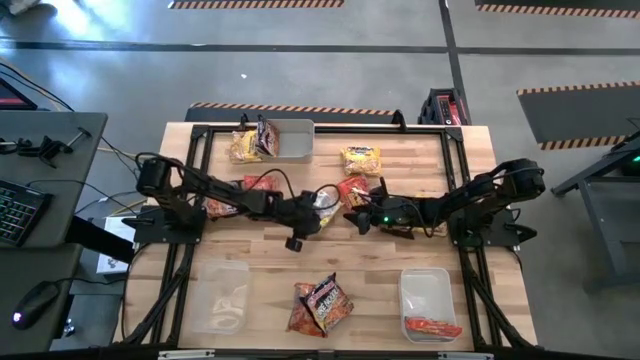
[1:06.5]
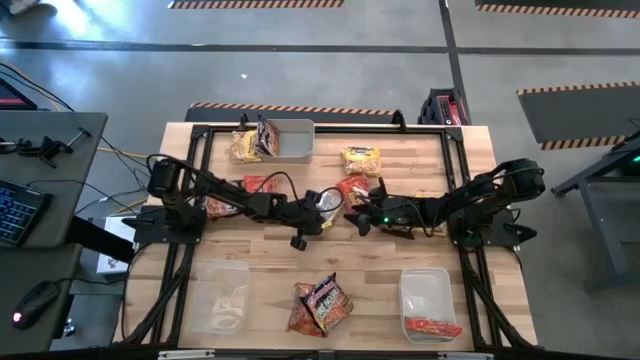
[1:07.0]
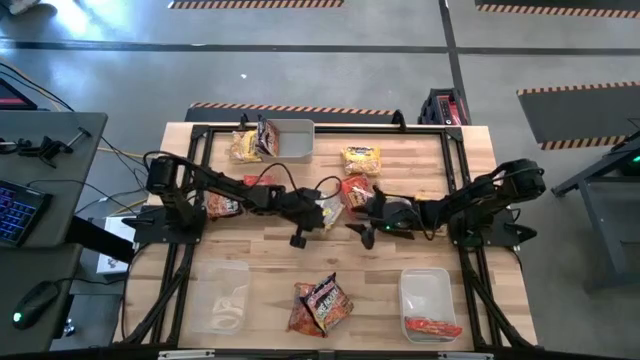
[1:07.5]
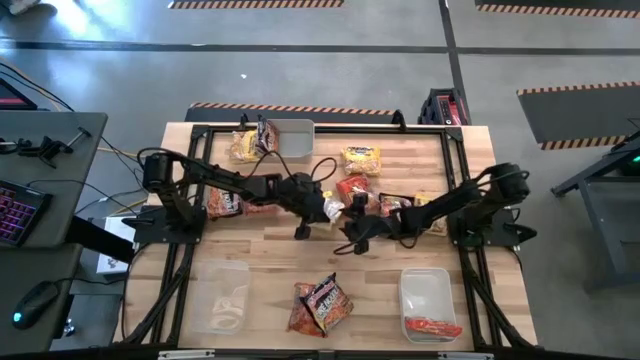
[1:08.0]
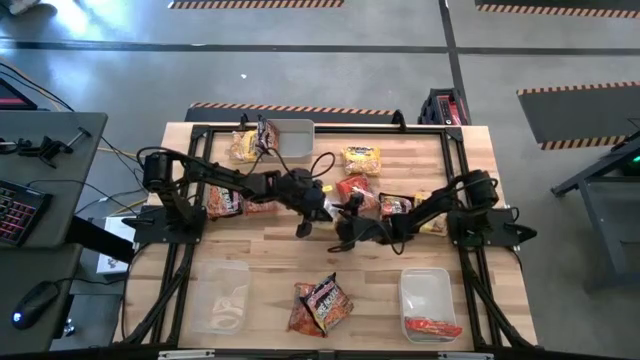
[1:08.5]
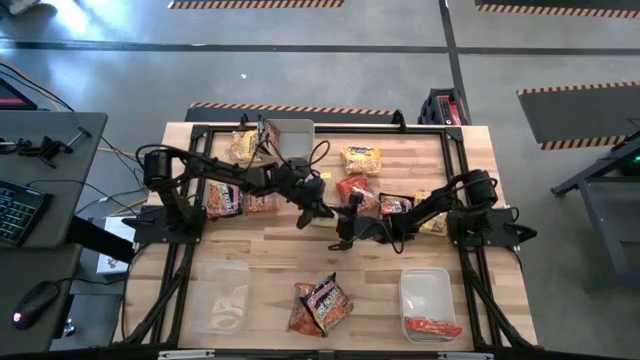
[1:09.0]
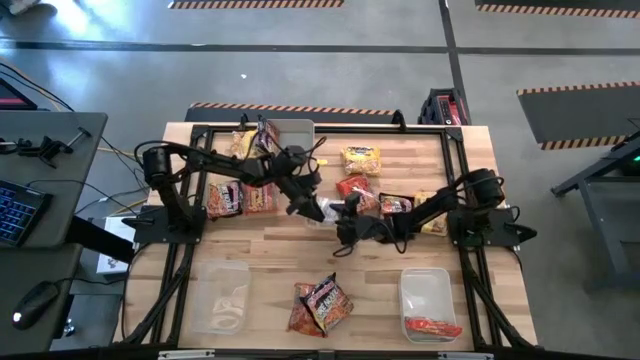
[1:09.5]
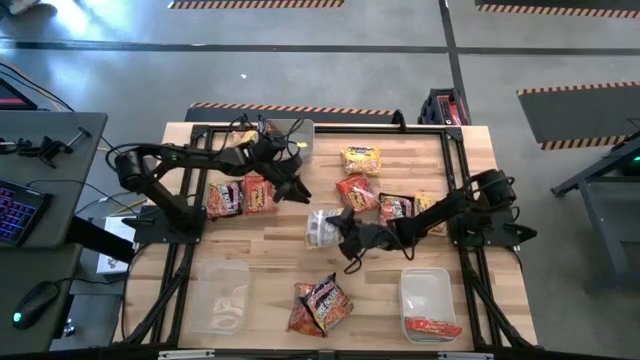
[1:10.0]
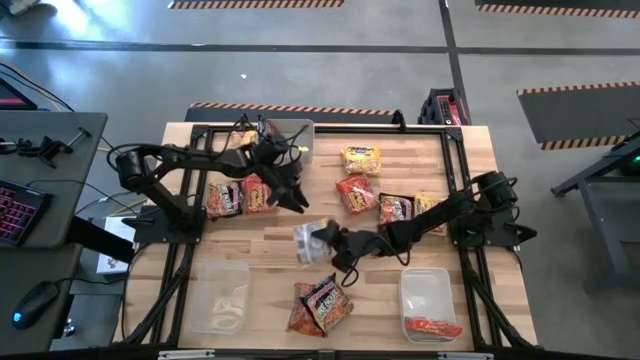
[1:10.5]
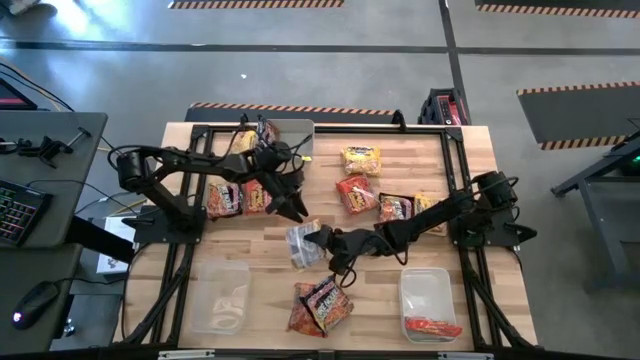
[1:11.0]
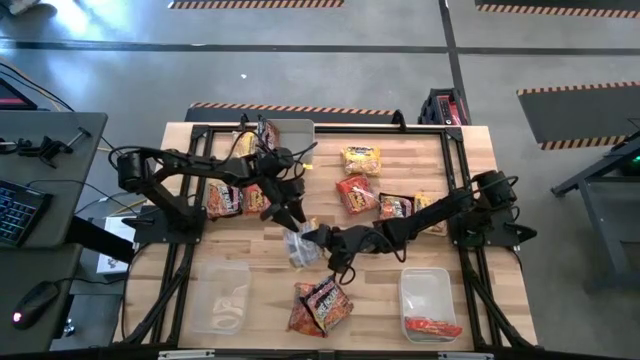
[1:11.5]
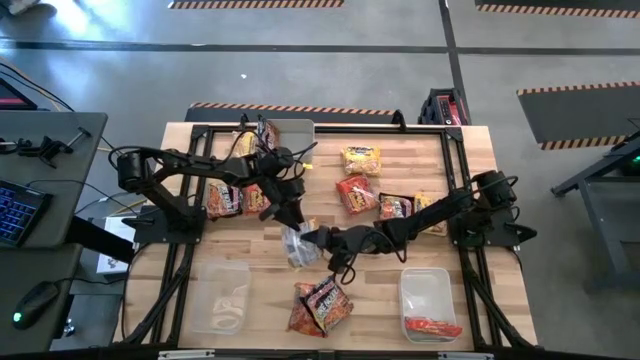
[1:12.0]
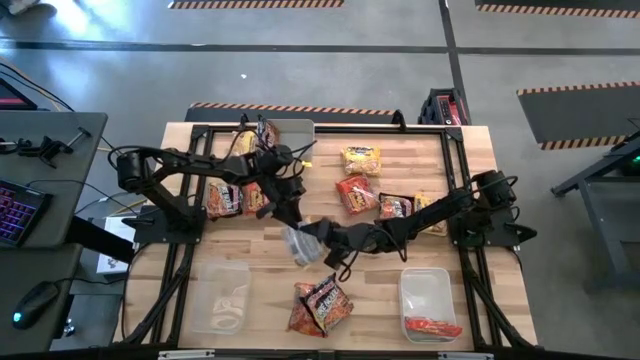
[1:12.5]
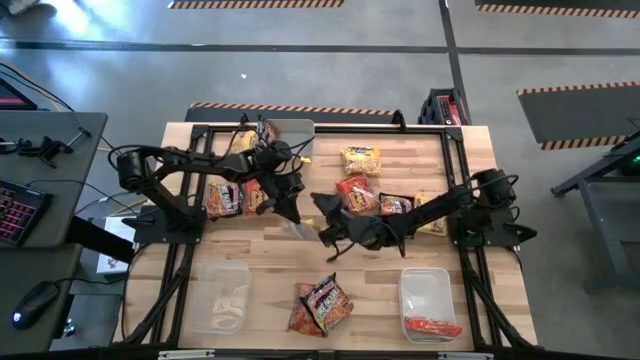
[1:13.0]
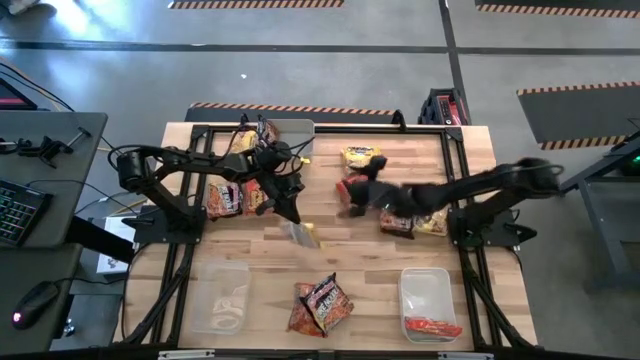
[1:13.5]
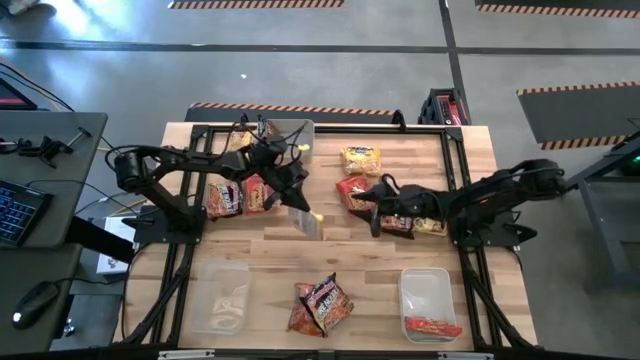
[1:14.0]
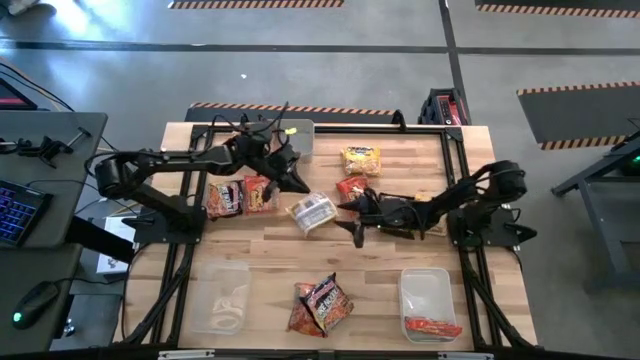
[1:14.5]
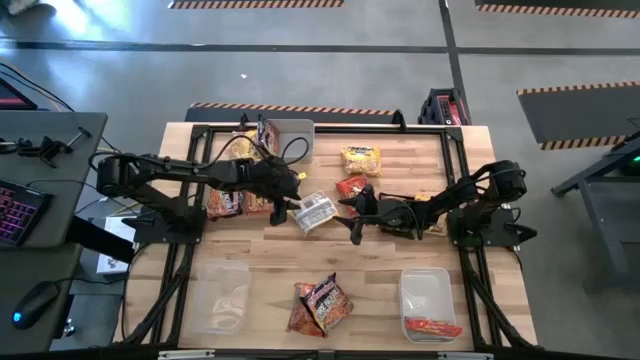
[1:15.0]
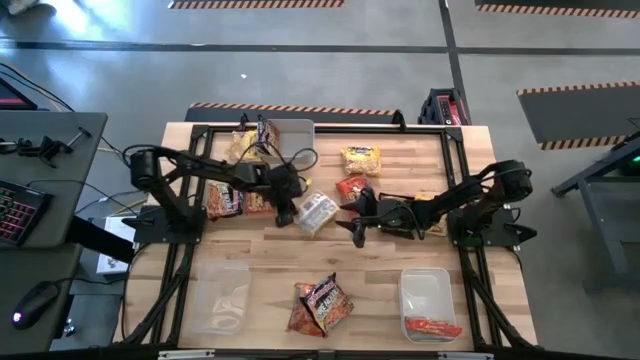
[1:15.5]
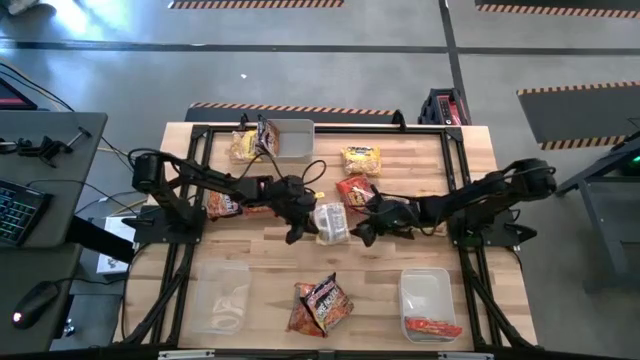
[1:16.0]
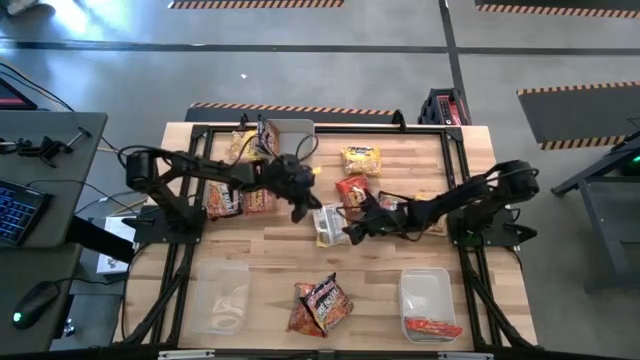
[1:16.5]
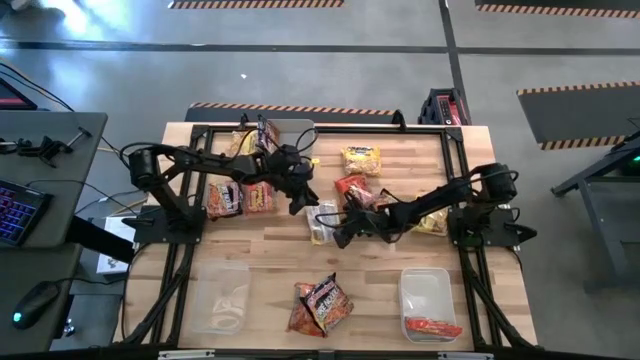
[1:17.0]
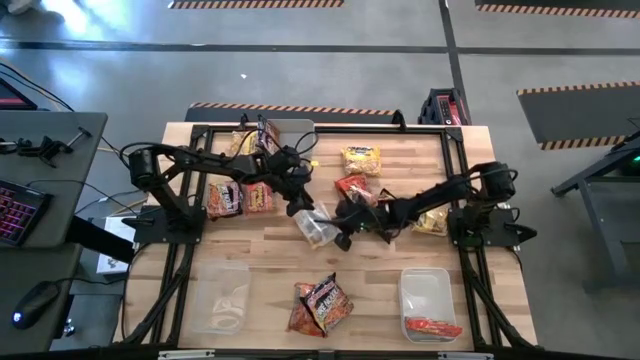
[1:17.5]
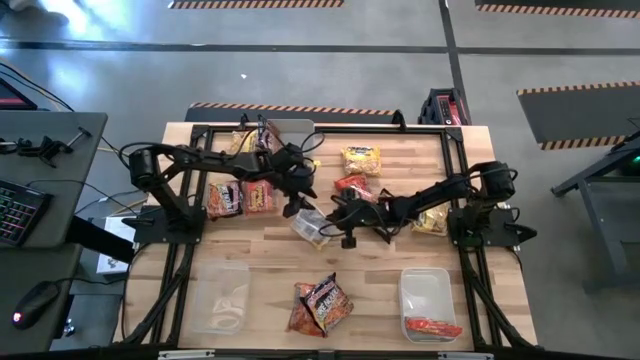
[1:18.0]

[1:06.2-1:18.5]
Task: Sort Maruchan noodles
Put the bottom left yellow noodle pack into the transparent bin

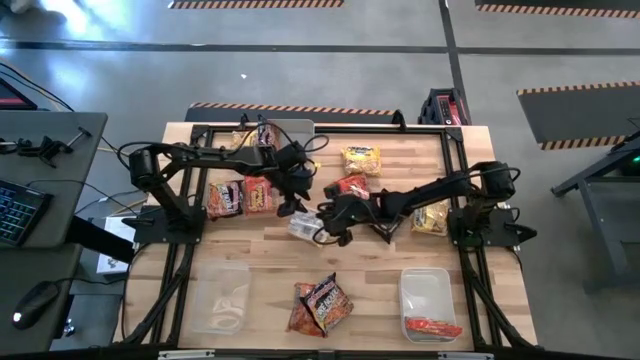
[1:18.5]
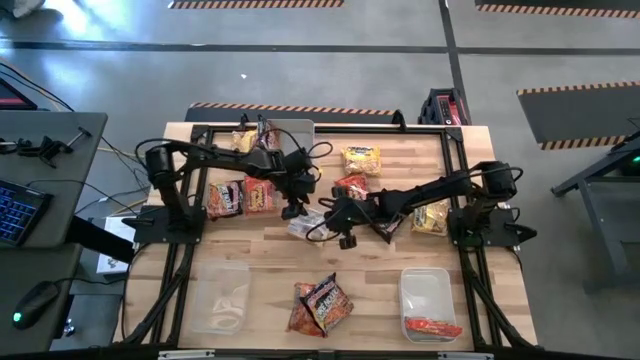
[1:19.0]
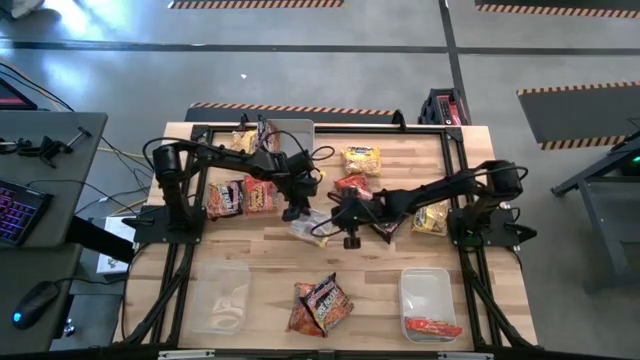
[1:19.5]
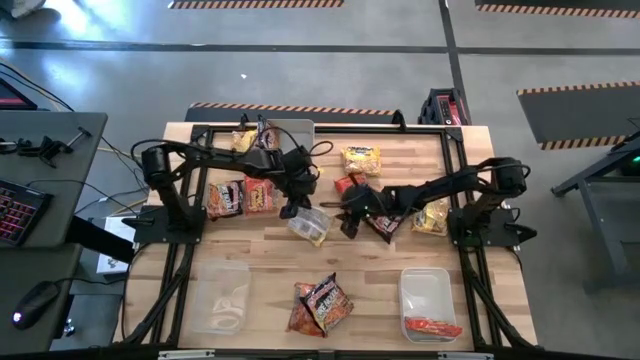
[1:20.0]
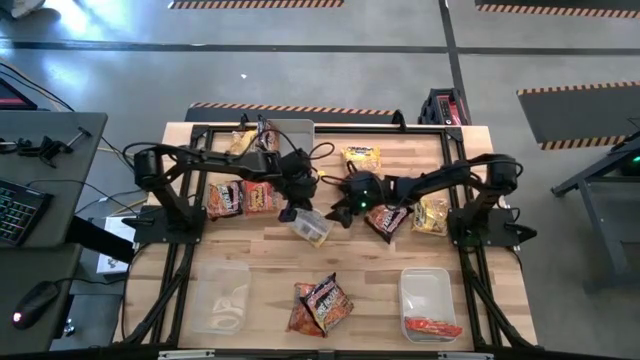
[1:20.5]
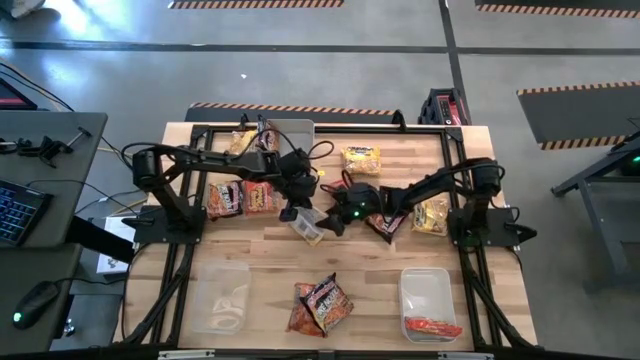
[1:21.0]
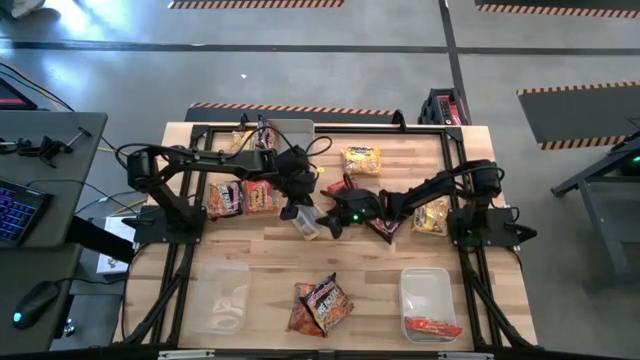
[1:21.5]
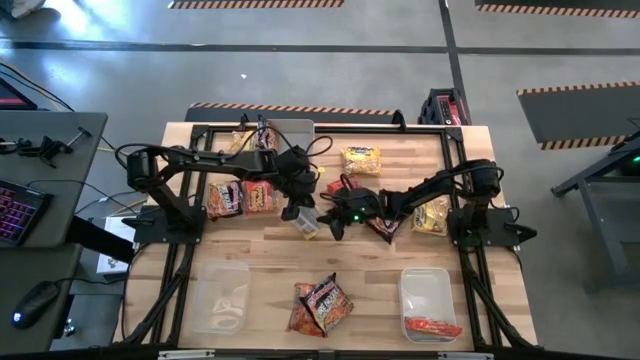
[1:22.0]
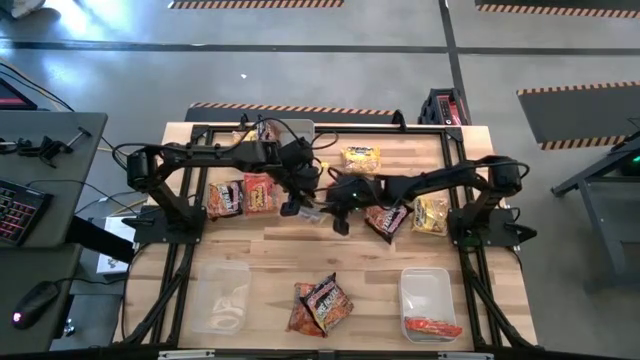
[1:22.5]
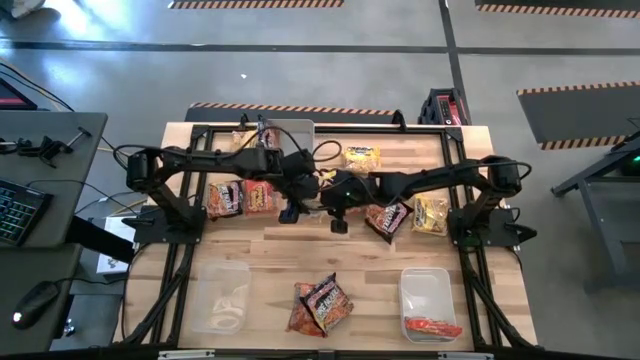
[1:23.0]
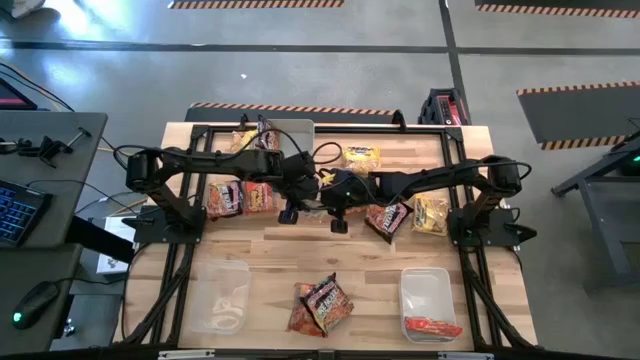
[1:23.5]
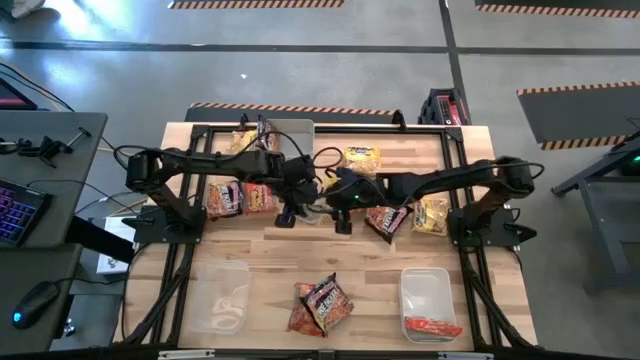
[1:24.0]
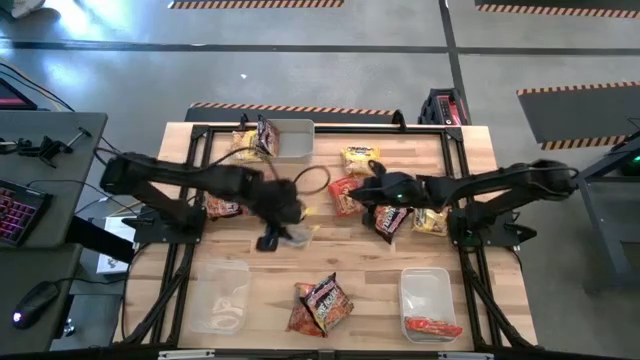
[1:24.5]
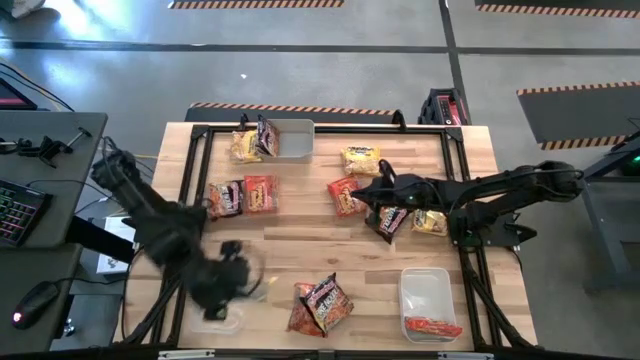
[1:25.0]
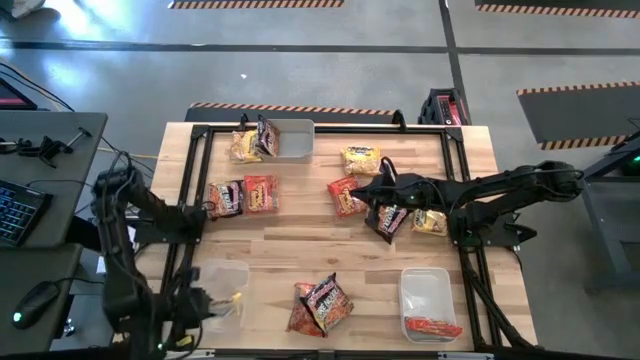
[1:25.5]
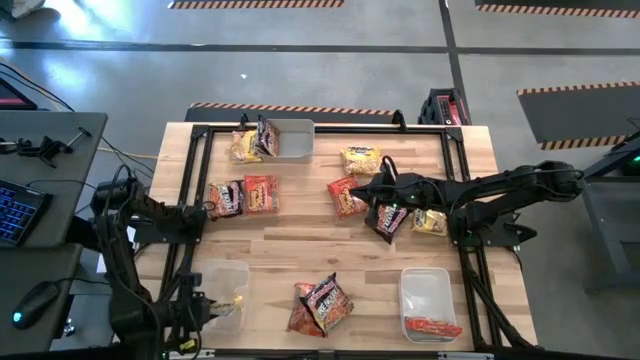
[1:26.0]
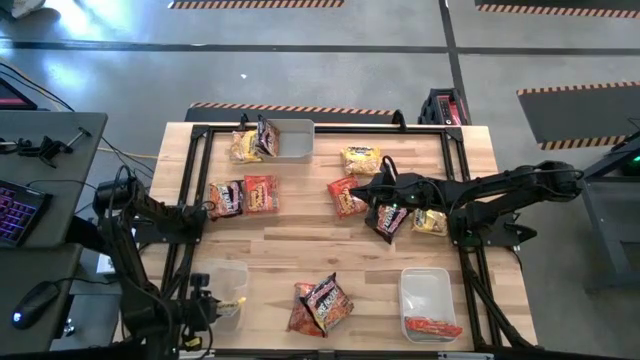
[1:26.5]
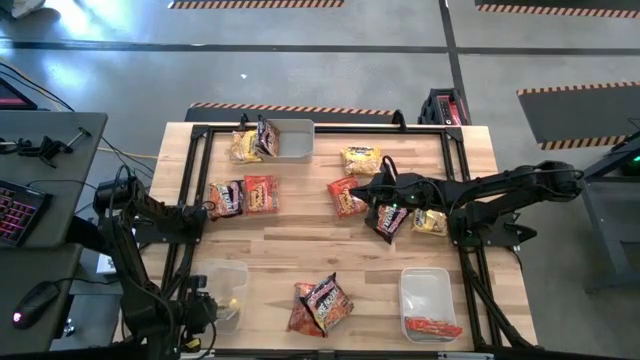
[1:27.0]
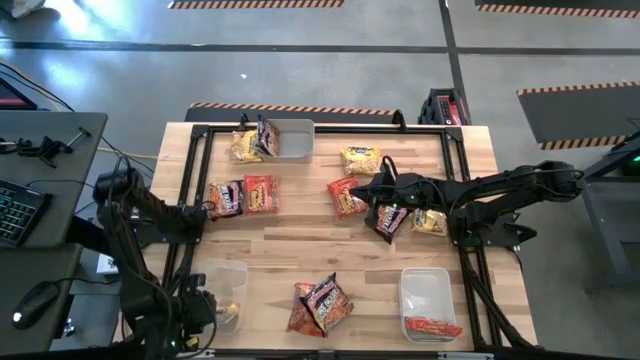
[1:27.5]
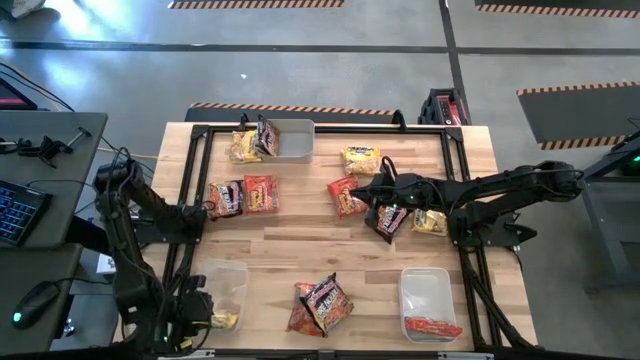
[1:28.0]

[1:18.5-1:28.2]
Put the bottom left yellow noodle pack into the transparent bin
